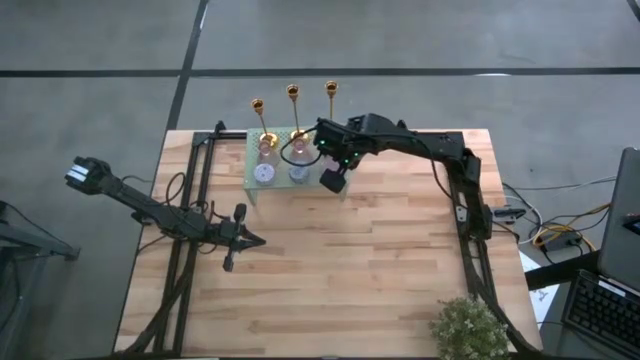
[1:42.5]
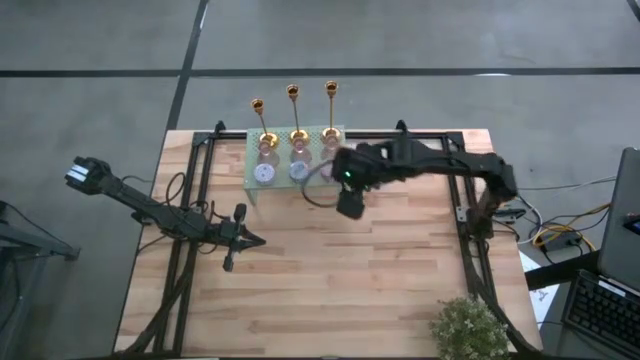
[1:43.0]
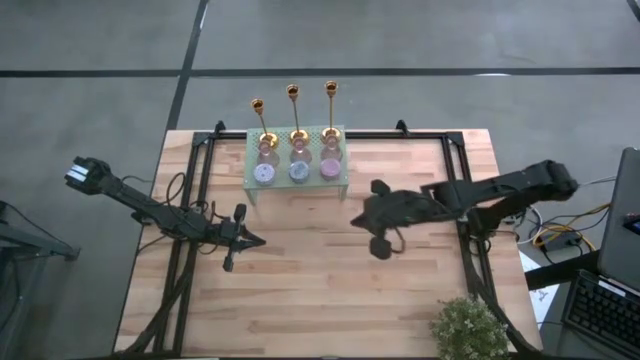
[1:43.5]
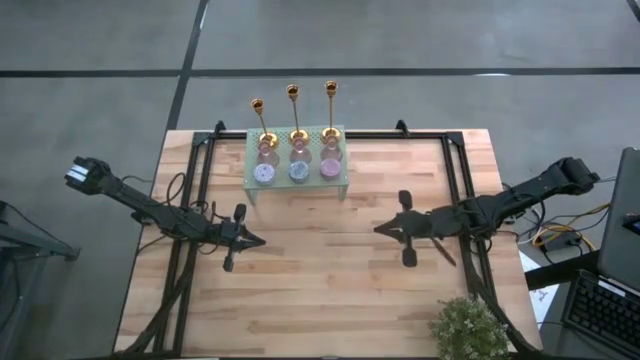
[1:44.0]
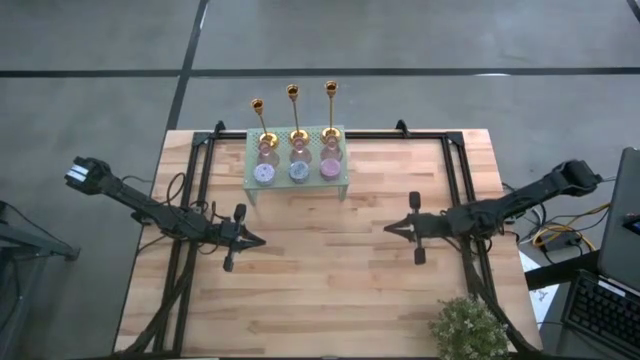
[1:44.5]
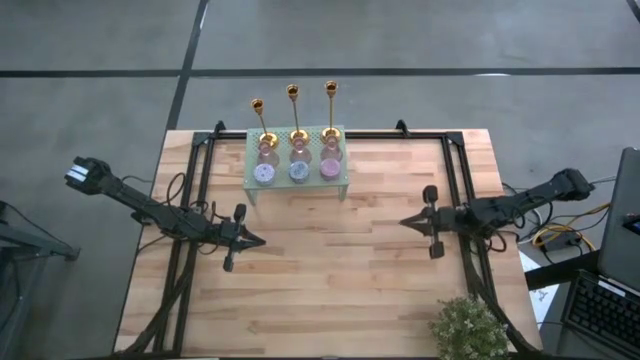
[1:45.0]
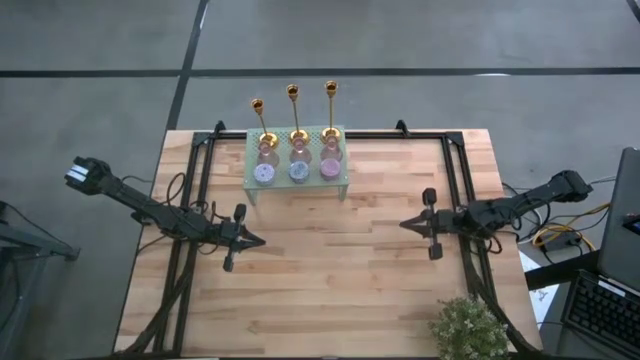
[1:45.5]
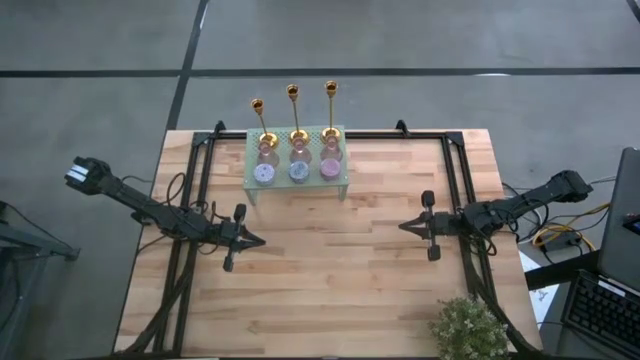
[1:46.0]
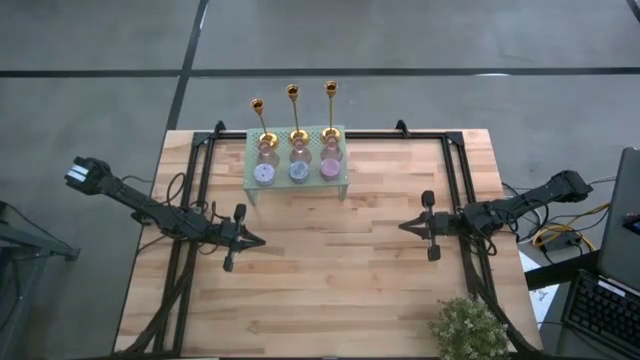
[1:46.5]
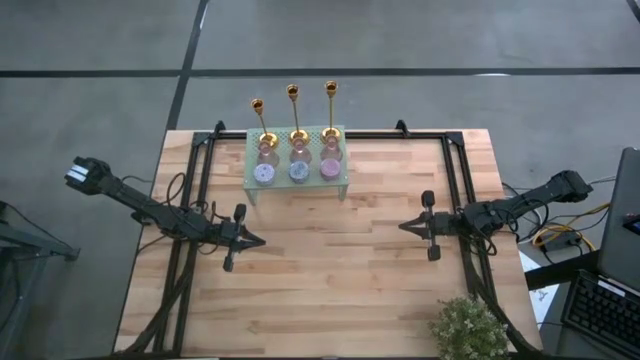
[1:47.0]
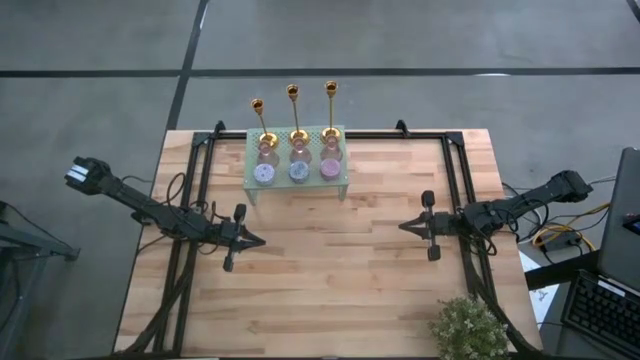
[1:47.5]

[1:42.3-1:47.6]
Task: Pick & Place candle stick holders
Return to Home Position

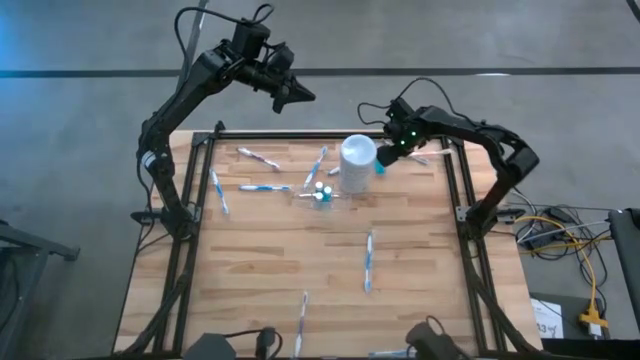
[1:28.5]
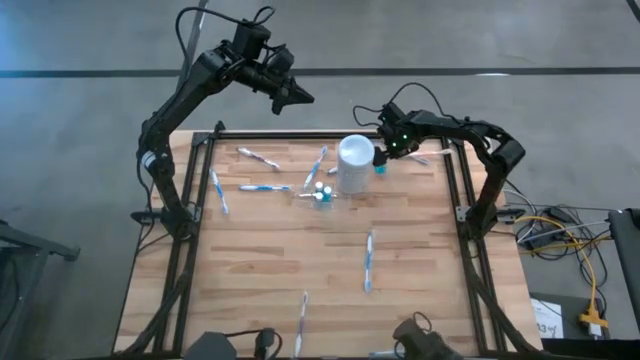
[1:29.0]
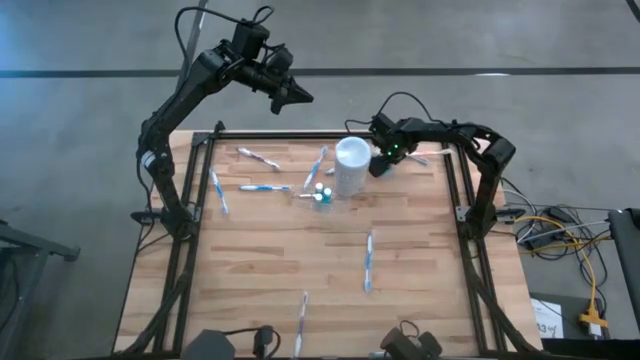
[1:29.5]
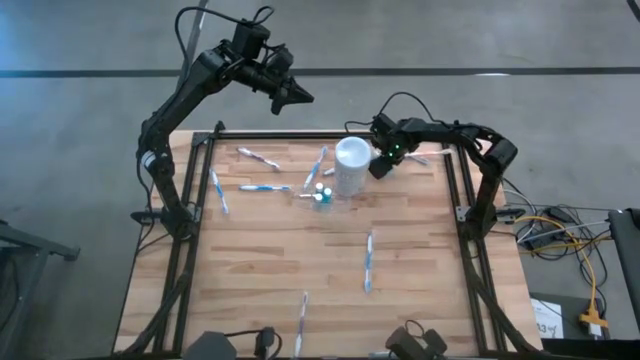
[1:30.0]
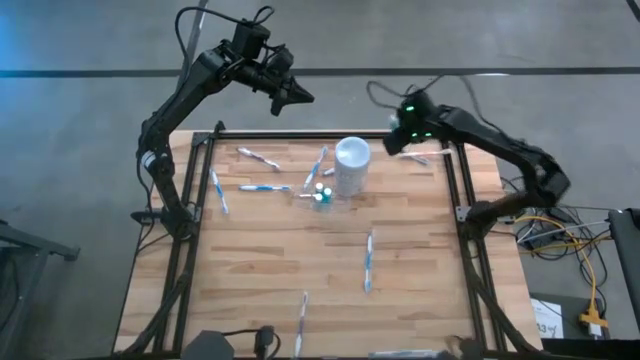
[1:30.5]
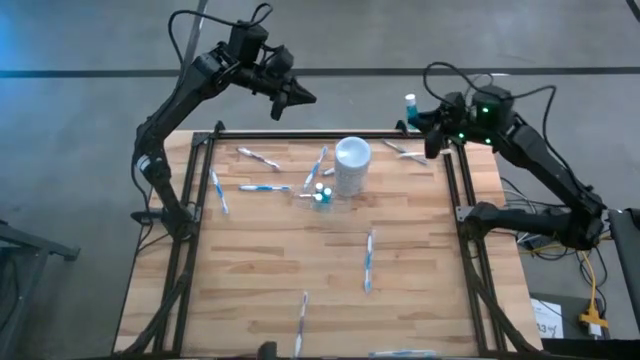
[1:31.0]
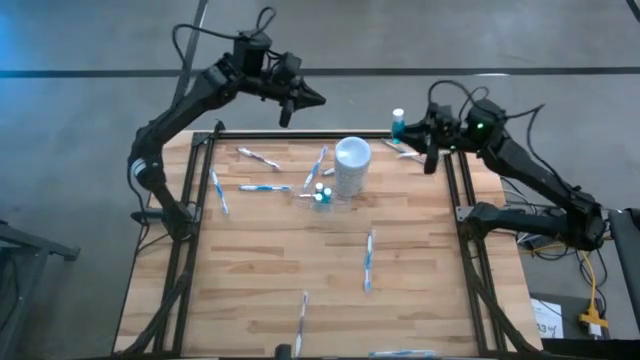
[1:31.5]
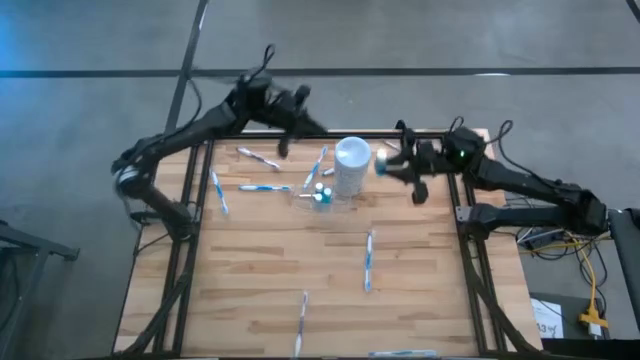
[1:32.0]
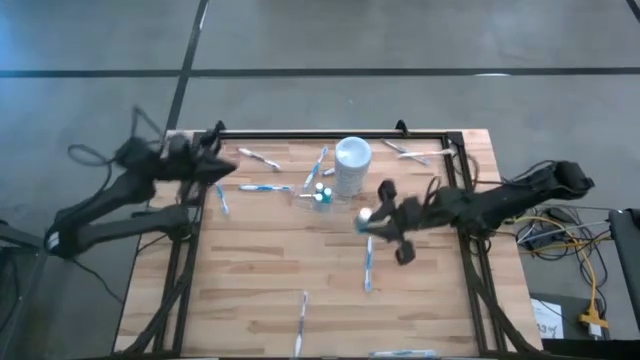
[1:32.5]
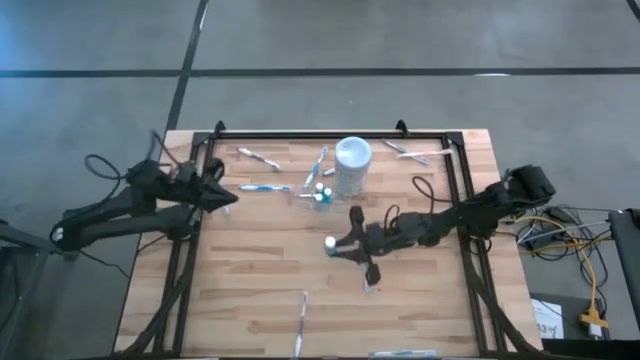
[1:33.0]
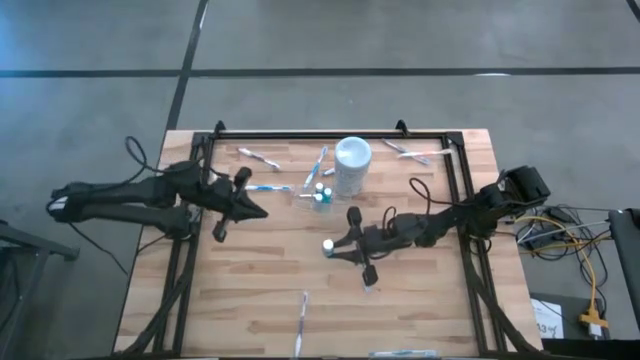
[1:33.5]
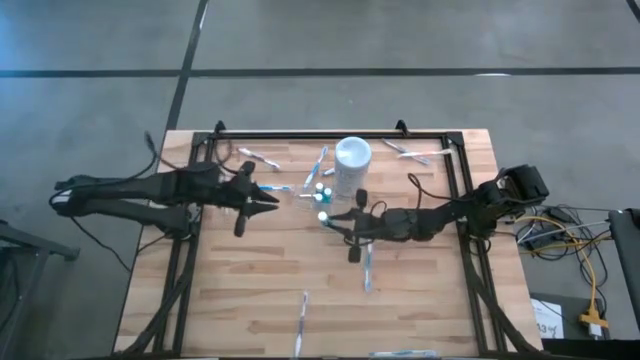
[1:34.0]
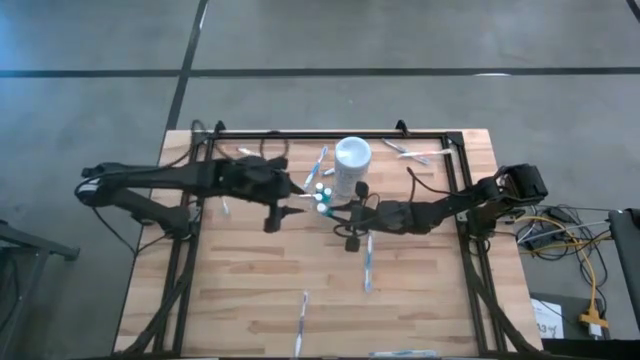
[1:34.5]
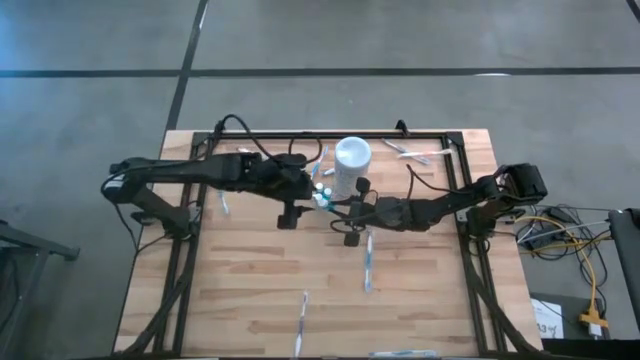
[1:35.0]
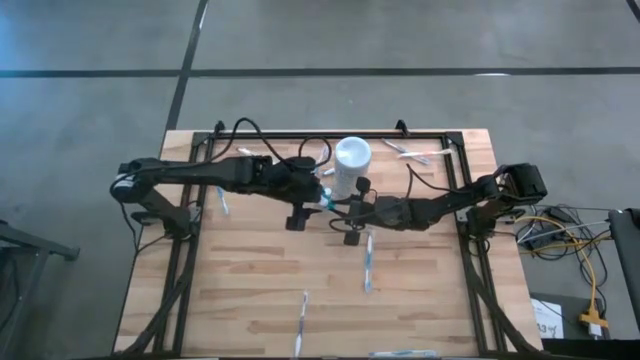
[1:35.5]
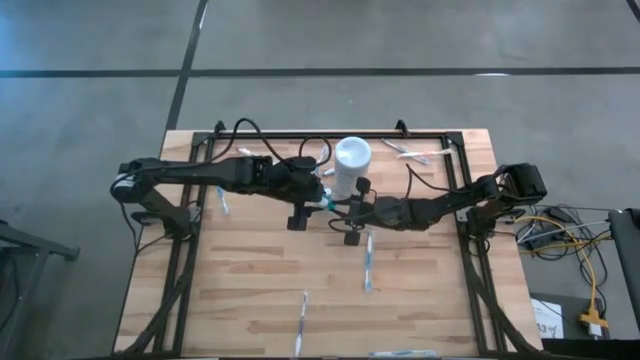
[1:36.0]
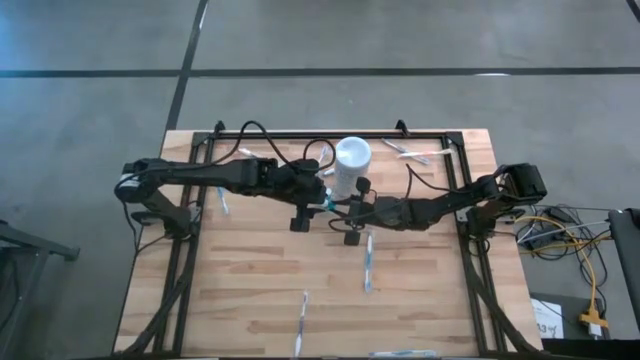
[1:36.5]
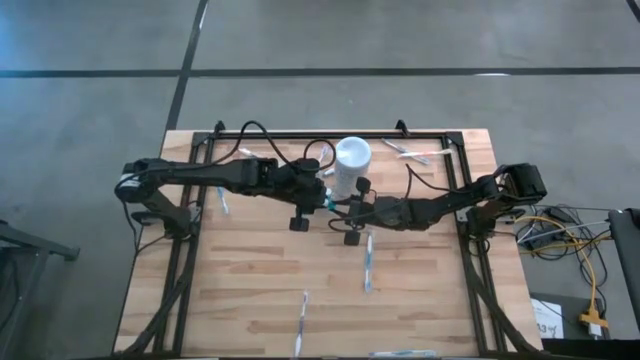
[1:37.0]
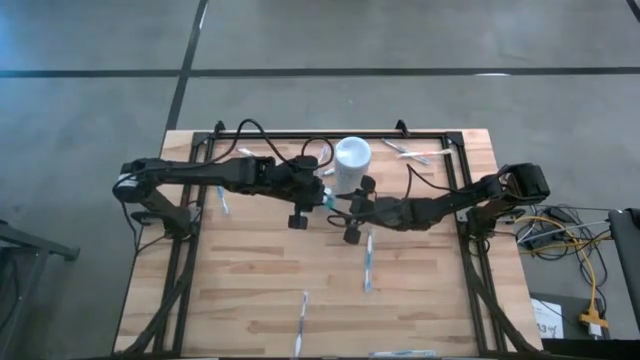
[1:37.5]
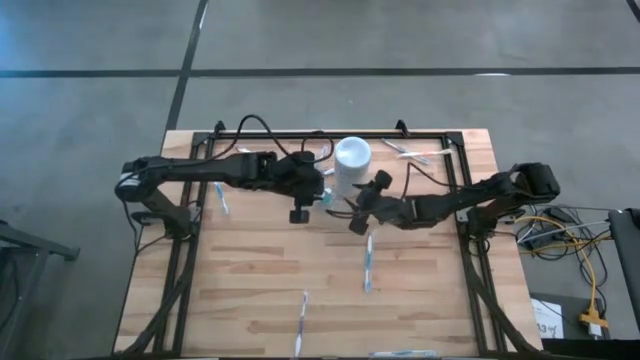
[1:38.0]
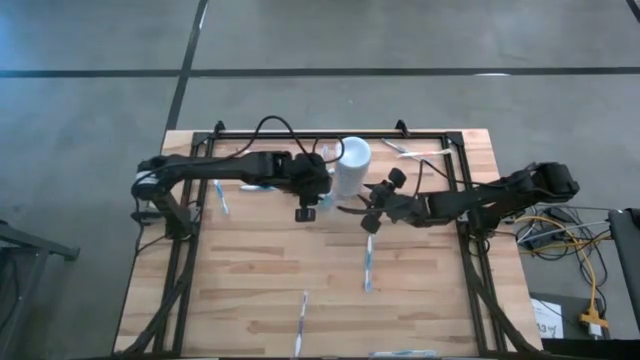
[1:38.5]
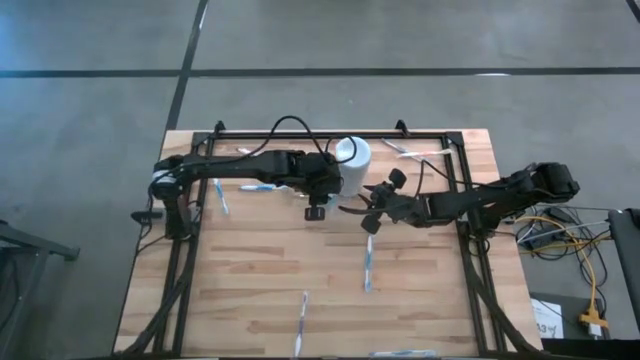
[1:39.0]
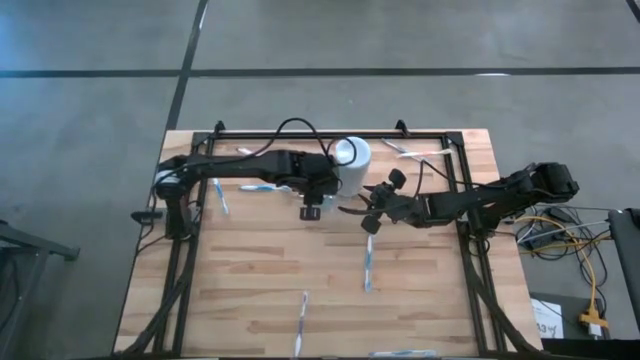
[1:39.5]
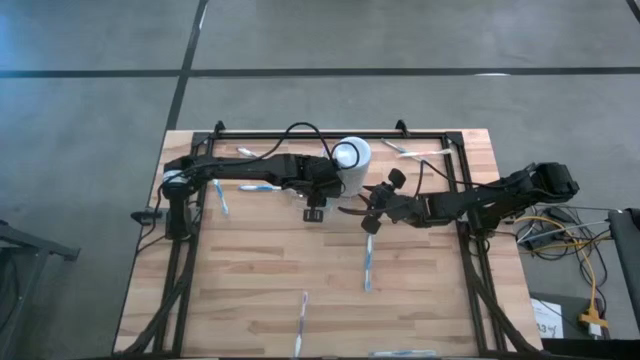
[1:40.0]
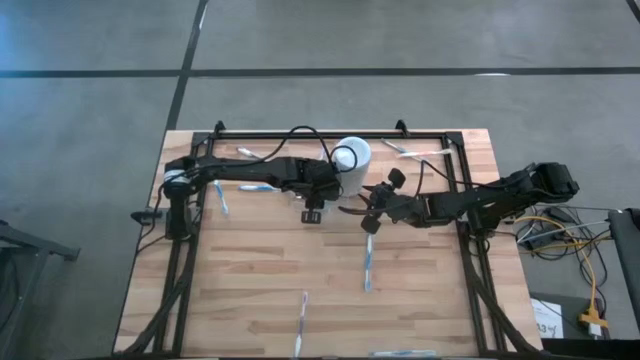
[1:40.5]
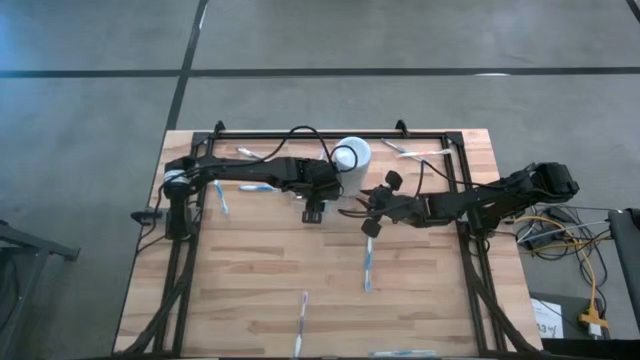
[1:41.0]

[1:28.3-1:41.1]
Task: Pick & Place toothbrushing station
Put the mouthwash into the transparent organizer

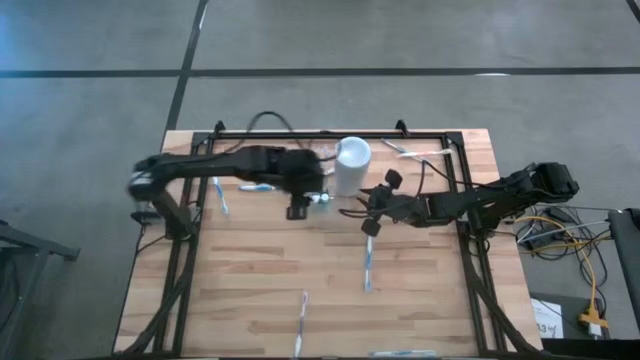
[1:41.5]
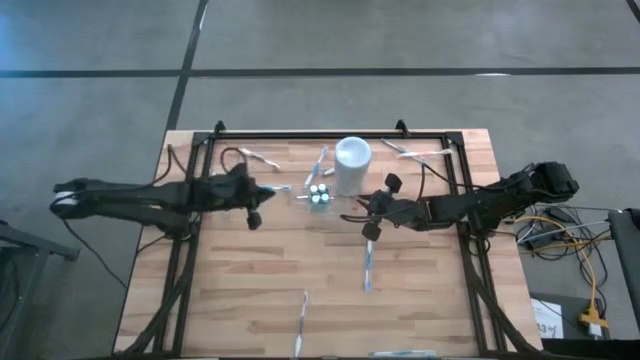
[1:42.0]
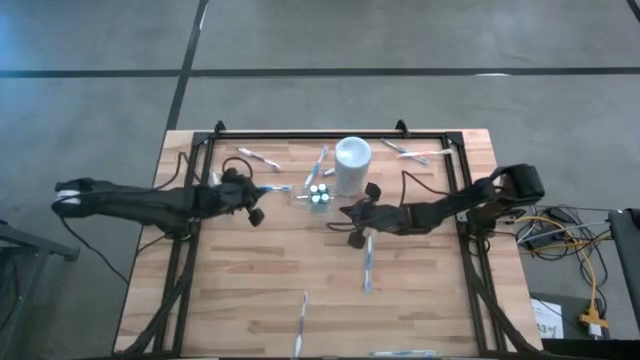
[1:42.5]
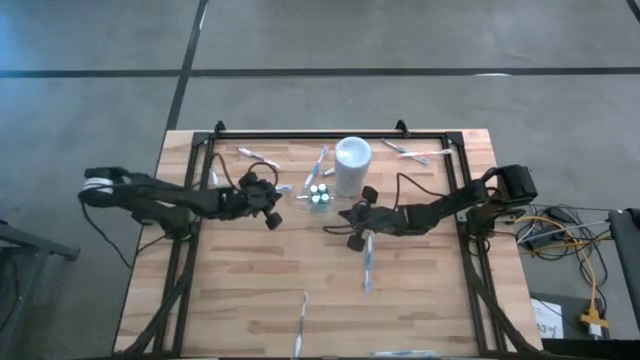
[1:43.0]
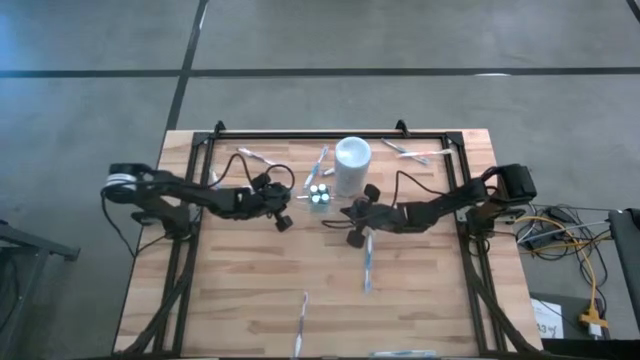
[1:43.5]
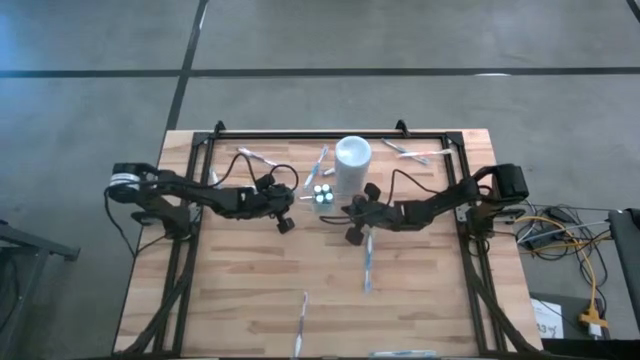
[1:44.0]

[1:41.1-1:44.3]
Adjust the transparent organizer
